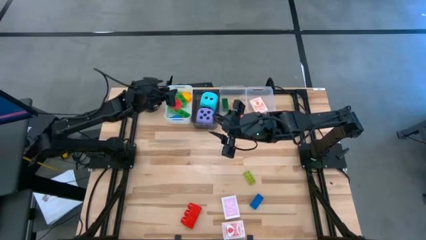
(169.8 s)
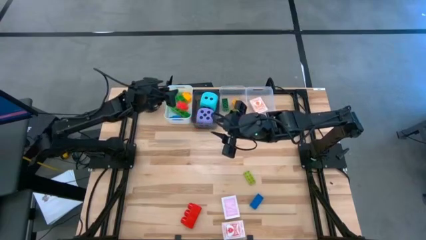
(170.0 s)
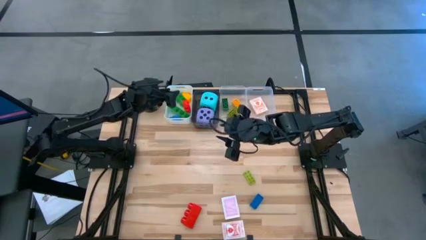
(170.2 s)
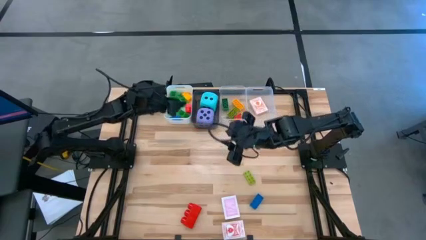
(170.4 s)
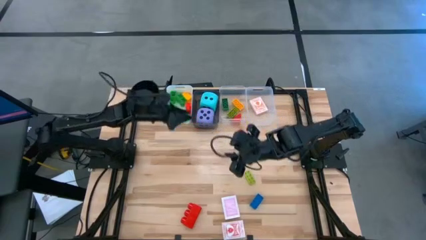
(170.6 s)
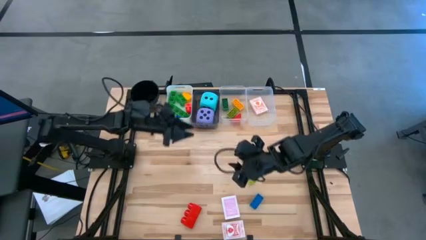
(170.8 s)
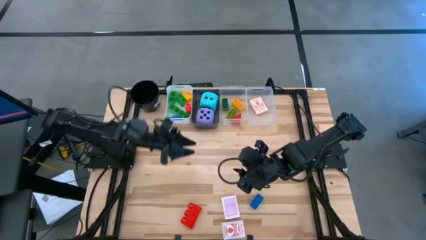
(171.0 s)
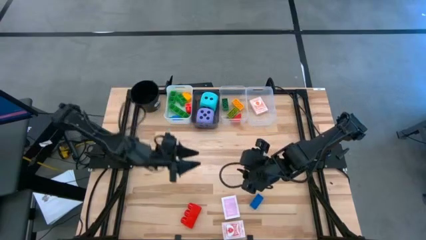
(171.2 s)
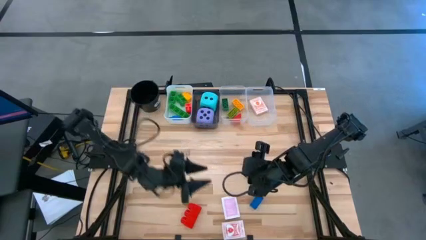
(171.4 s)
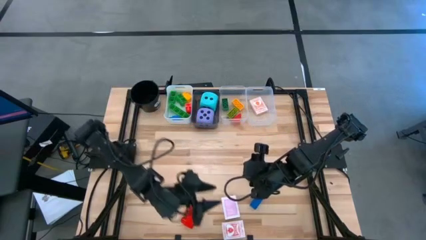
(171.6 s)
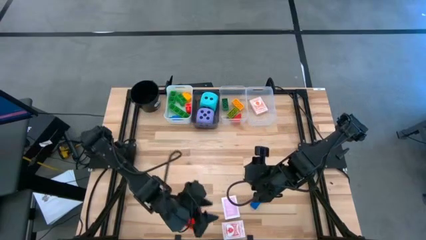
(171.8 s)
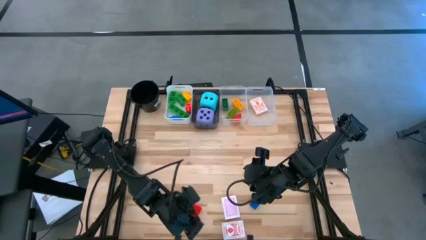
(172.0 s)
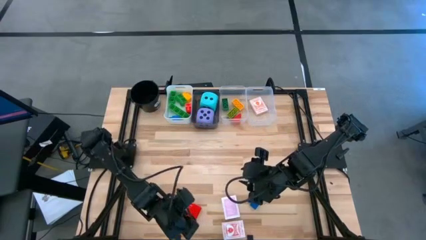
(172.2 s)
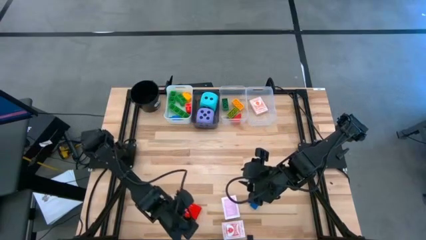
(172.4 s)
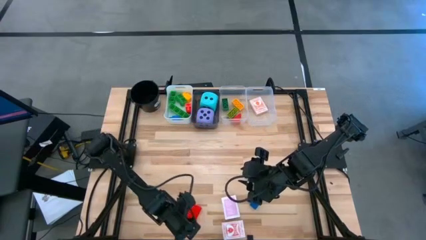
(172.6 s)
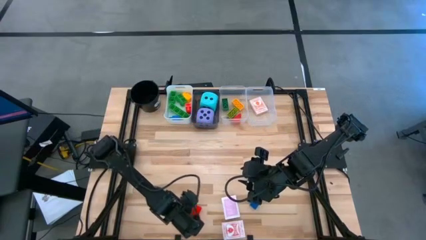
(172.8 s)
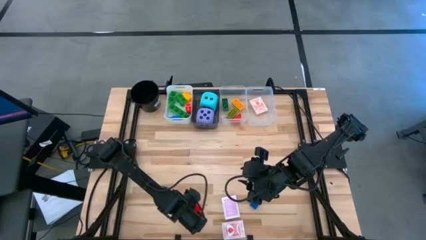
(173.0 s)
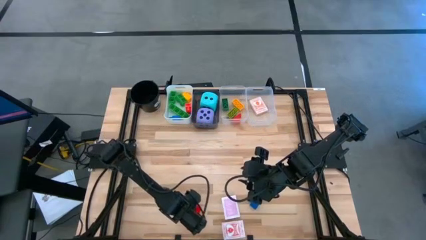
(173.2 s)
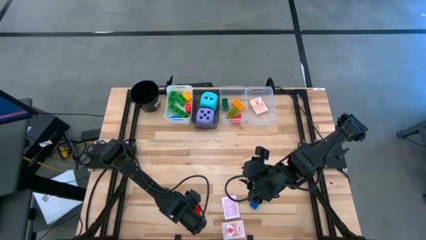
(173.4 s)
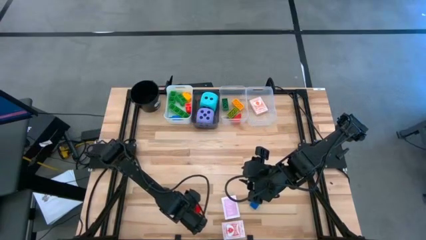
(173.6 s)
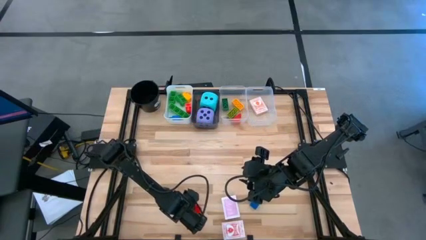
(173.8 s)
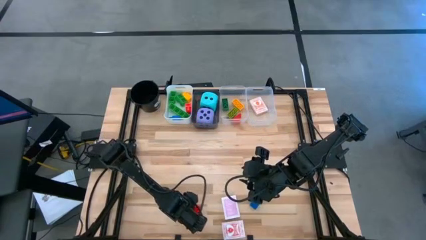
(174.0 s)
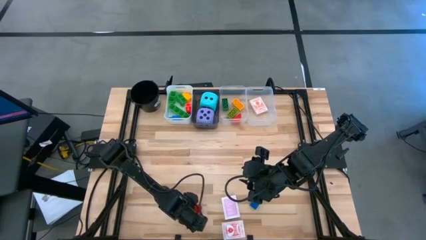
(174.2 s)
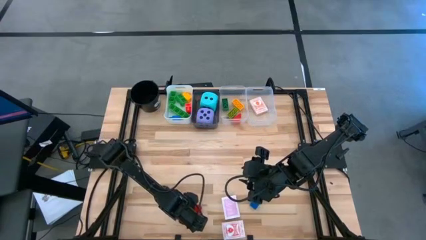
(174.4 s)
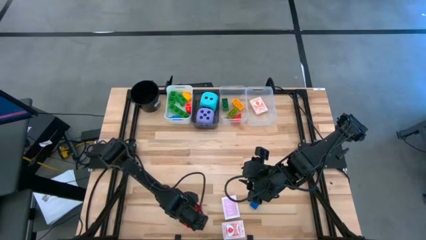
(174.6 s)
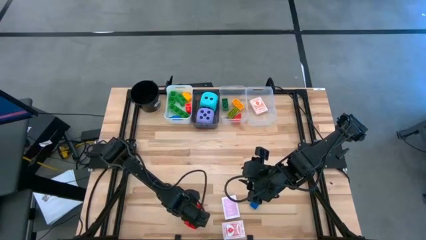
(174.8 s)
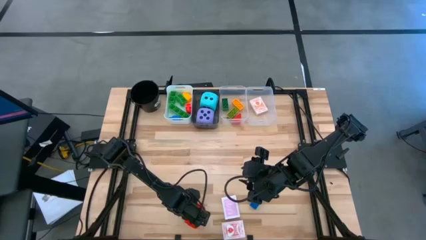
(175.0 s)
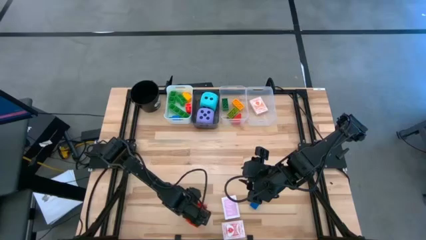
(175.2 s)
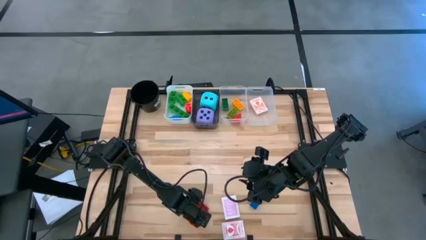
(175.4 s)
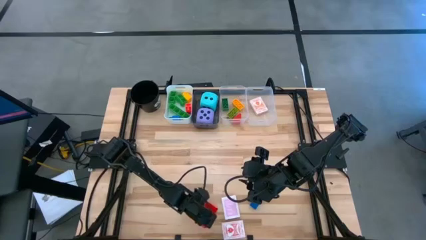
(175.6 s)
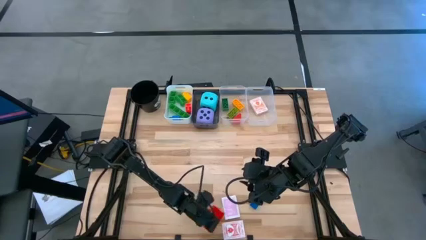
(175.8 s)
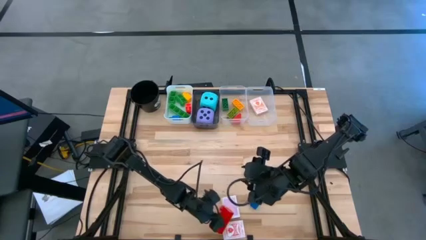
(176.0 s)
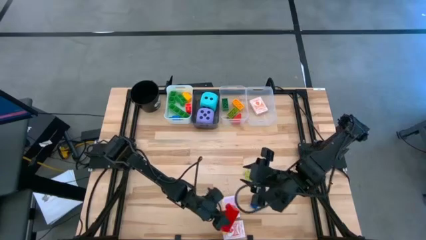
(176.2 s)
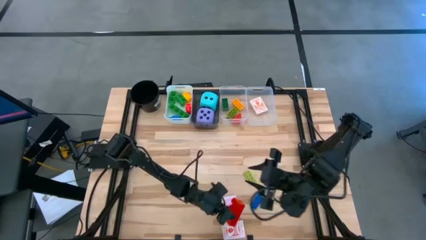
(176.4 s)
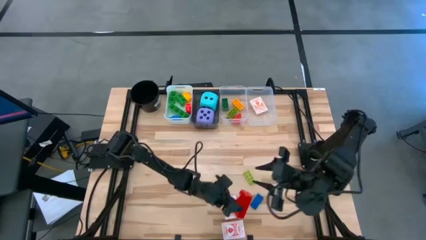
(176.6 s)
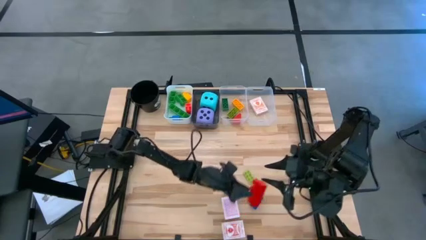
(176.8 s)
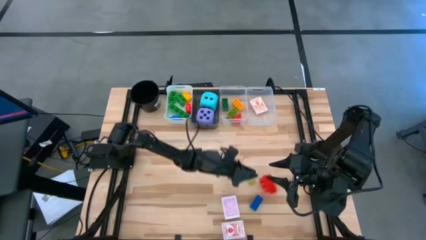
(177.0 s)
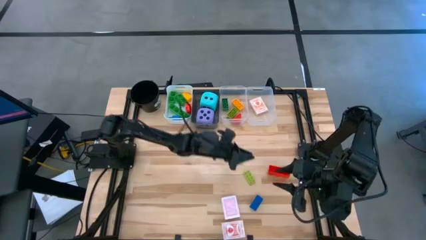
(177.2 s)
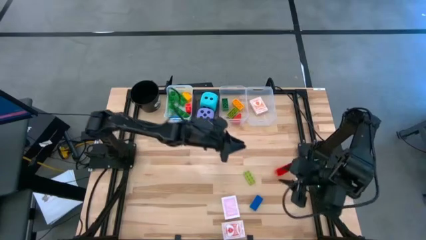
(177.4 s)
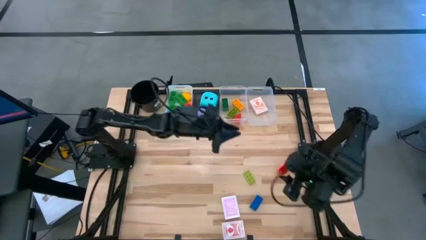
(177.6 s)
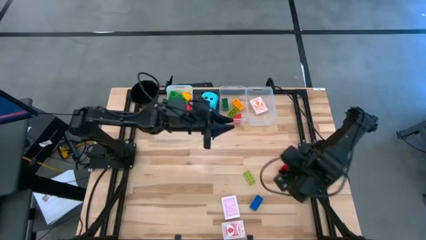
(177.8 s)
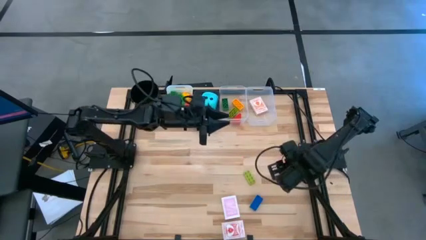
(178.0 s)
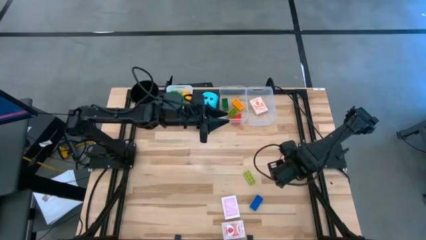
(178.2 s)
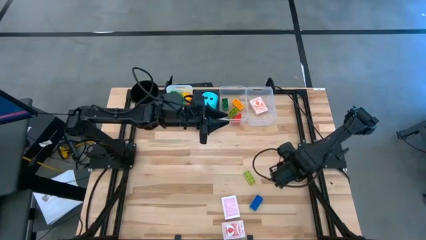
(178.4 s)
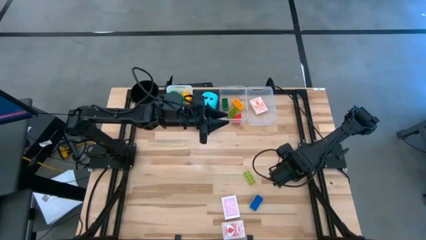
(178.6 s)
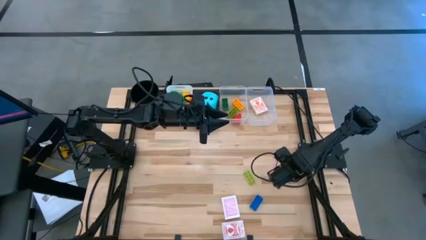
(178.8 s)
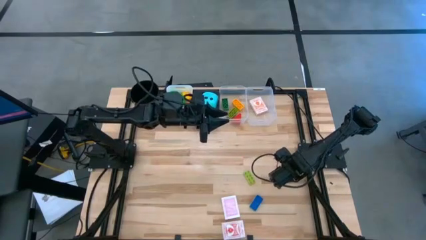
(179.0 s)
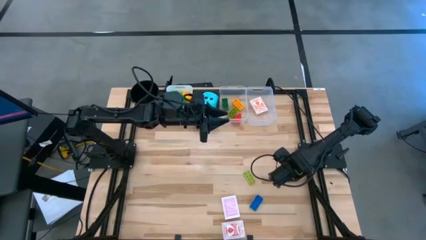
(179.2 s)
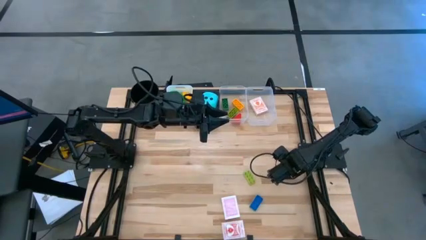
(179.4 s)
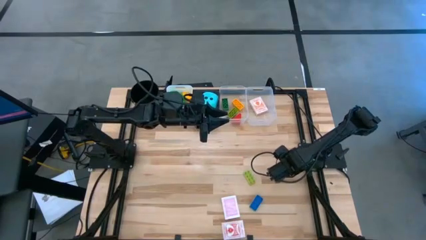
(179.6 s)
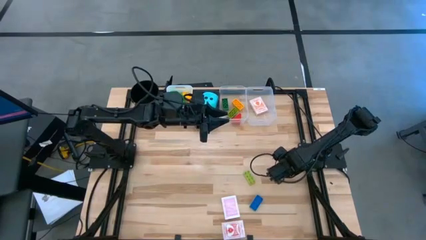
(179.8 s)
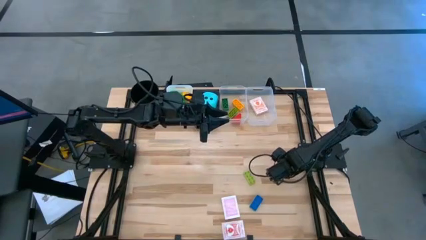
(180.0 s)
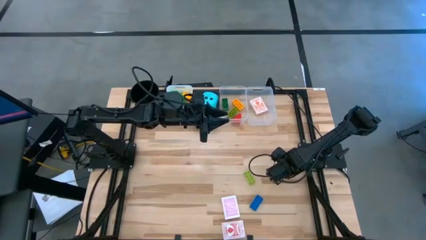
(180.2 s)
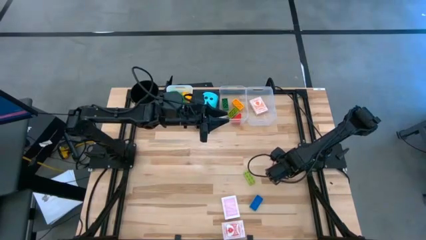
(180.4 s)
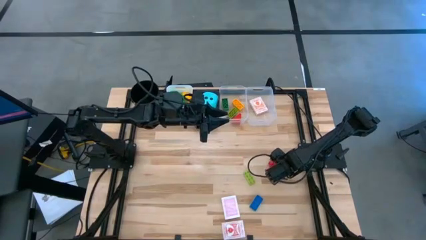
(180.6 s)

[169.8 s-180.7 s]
Task: Pick & Place Toys
Put the big red 3-stud game piece into the white bin

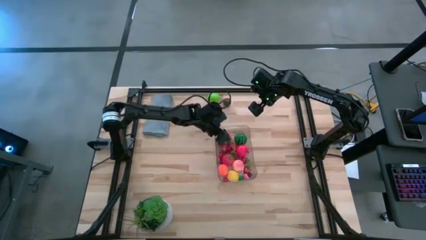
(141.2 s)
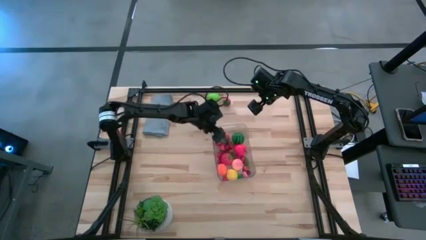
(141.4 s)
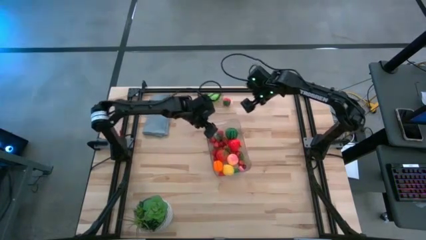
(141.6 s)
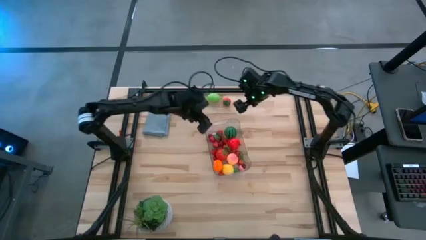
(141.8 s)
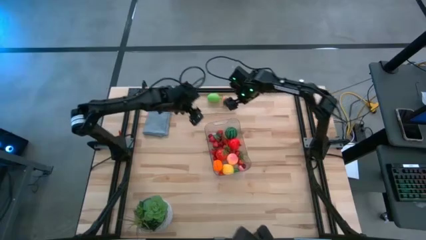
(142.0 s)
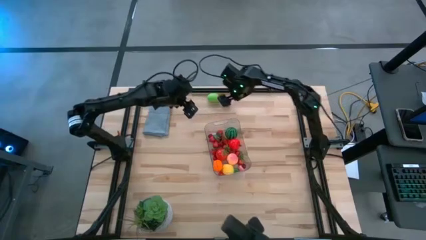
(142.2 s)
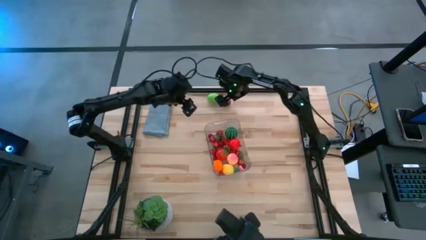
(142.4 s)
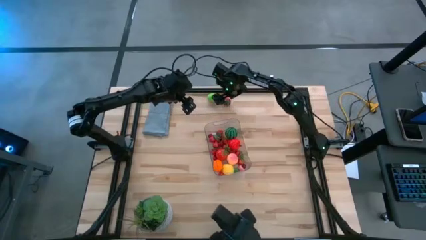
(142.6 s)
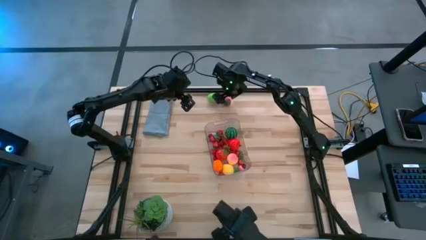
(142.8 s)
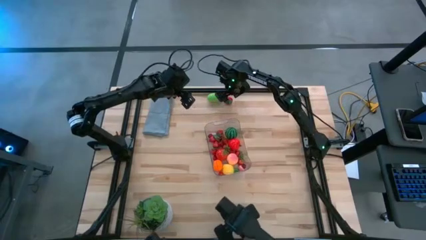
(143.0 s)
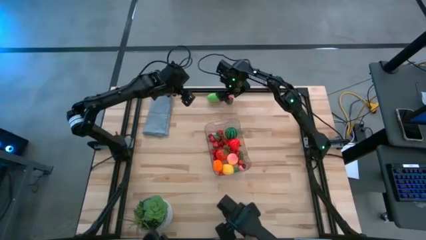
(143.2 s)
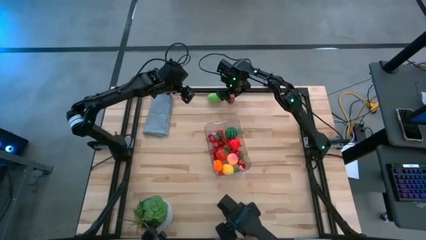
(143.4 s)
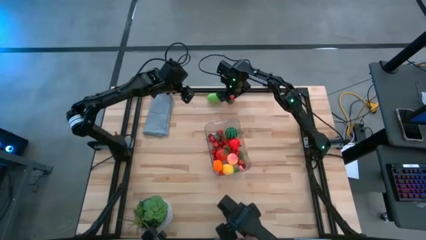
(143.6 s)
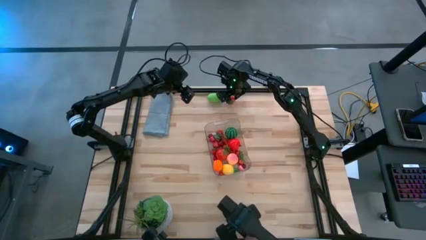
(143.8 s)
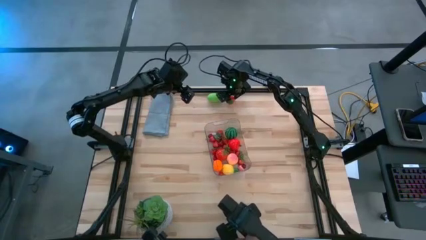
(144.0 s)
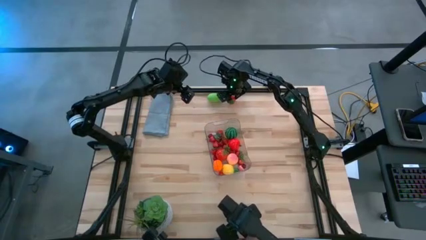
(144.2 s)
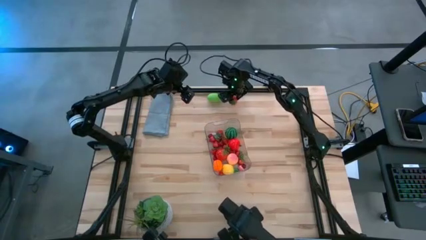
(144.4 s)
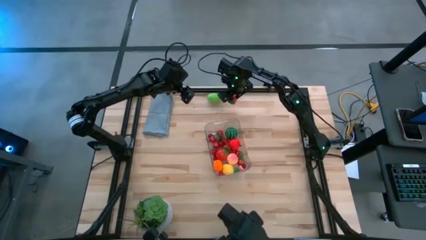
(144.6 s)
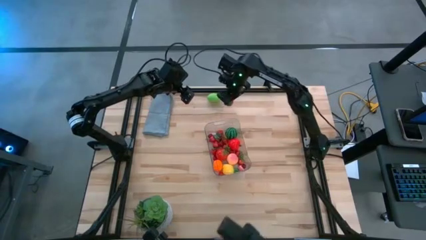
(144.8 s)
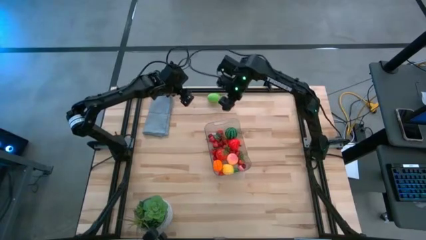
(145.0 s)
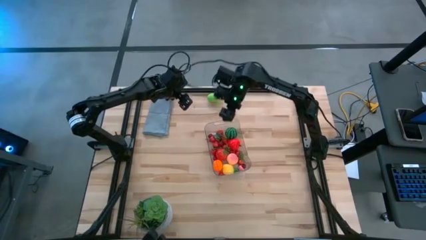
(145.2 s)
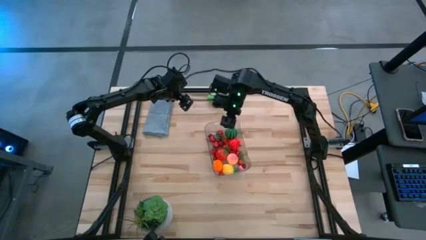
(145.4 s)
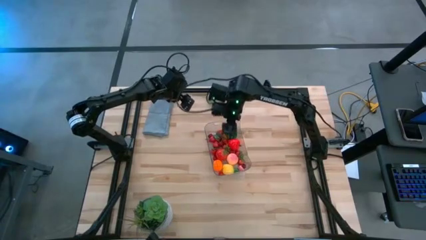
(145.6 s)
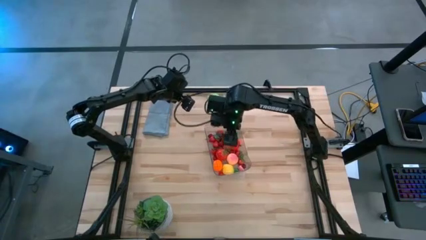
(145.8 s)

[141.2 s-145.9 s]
Task: Pick and placing Produce into tupperware
Put the red strawberry into the transparent bin
